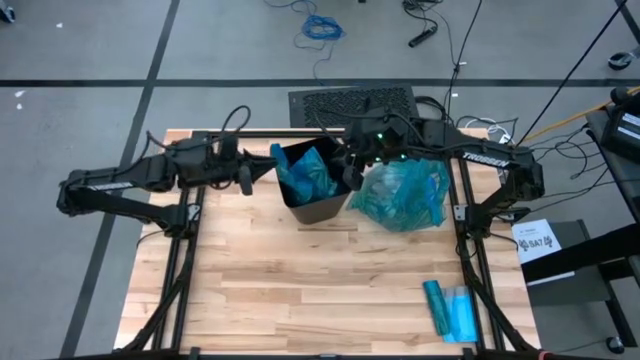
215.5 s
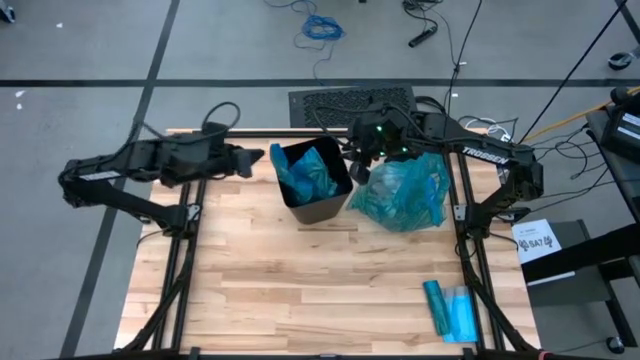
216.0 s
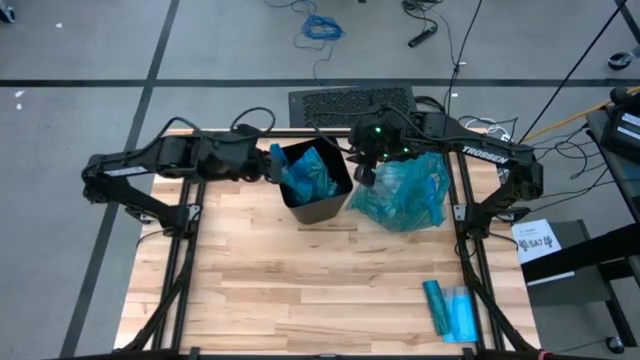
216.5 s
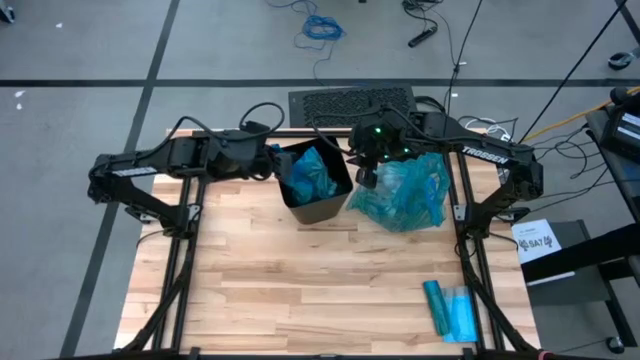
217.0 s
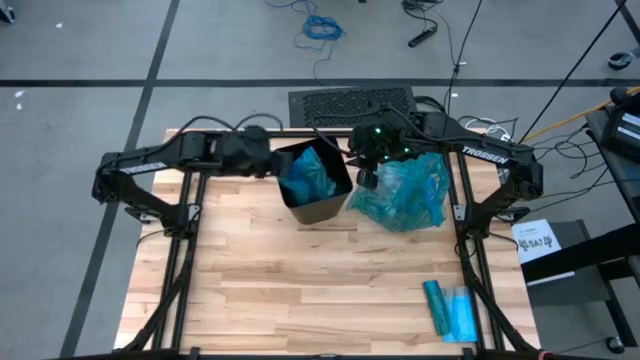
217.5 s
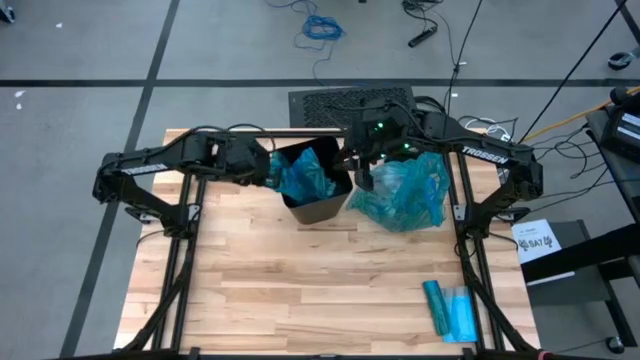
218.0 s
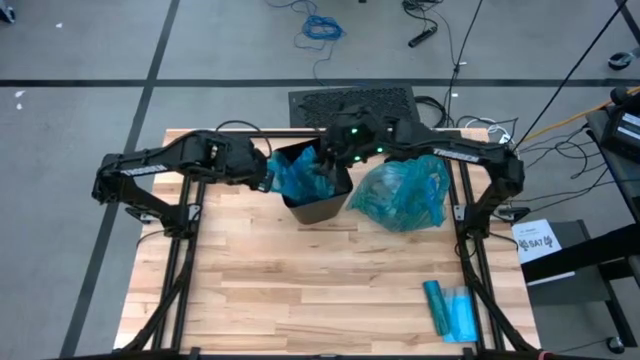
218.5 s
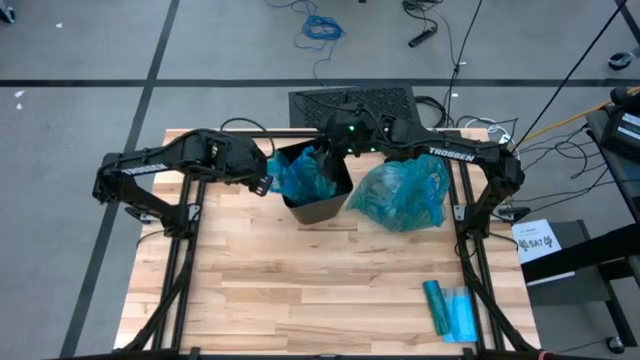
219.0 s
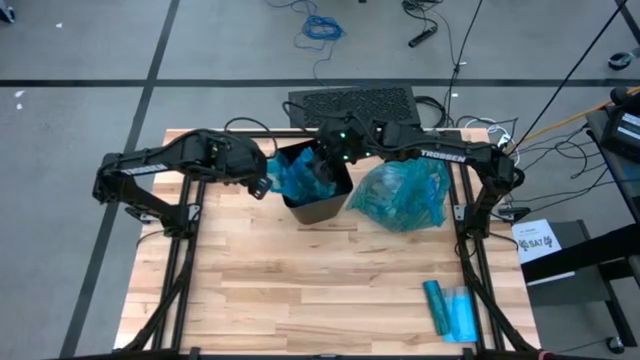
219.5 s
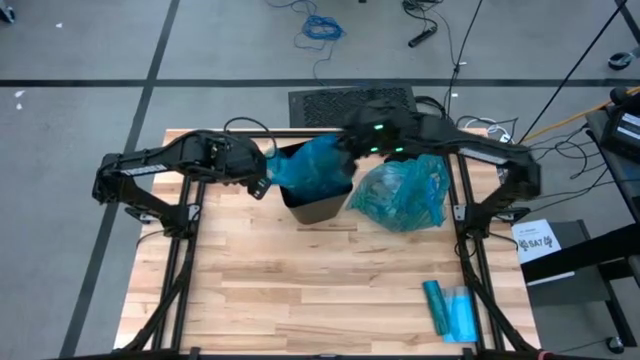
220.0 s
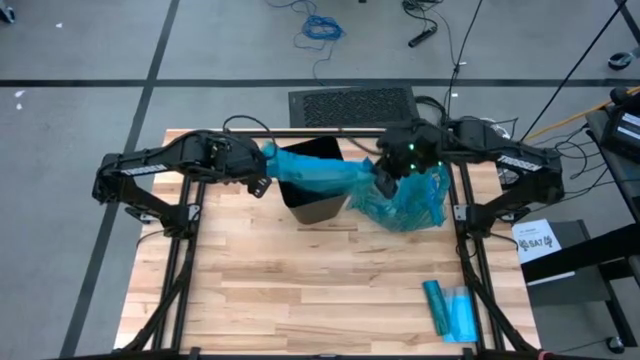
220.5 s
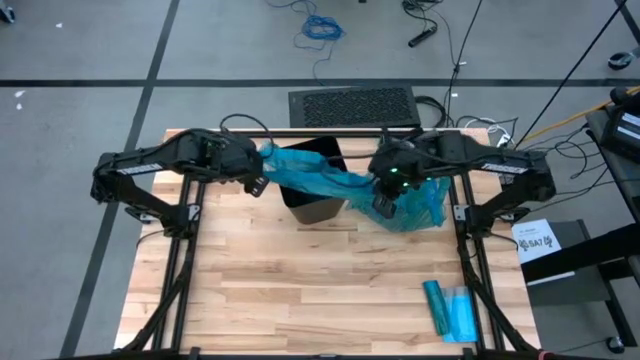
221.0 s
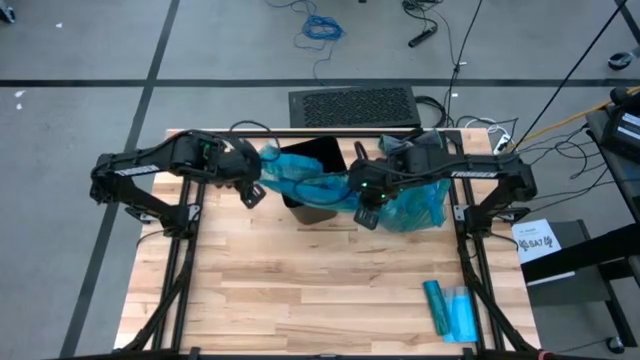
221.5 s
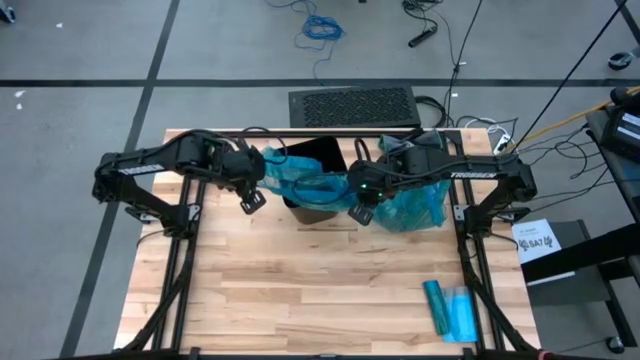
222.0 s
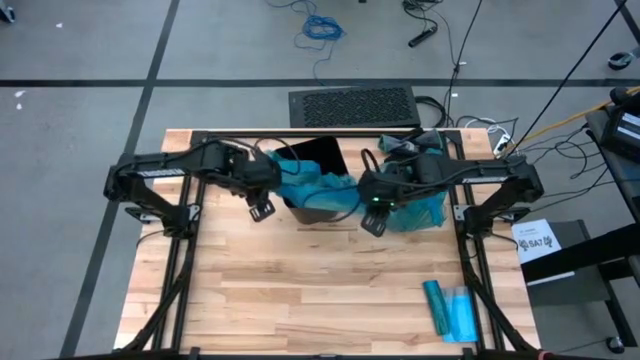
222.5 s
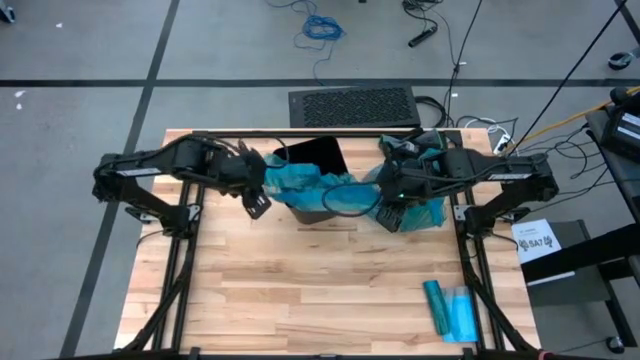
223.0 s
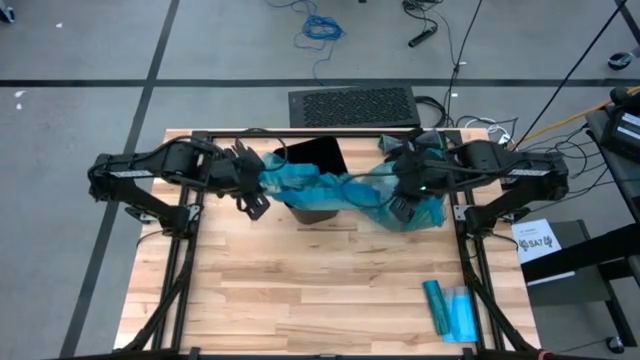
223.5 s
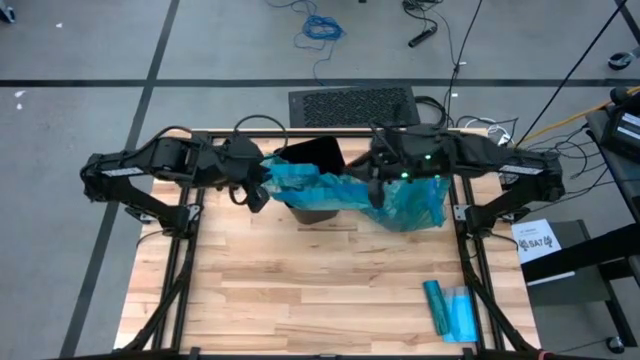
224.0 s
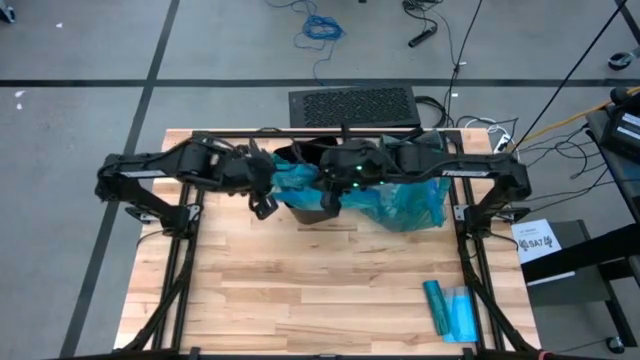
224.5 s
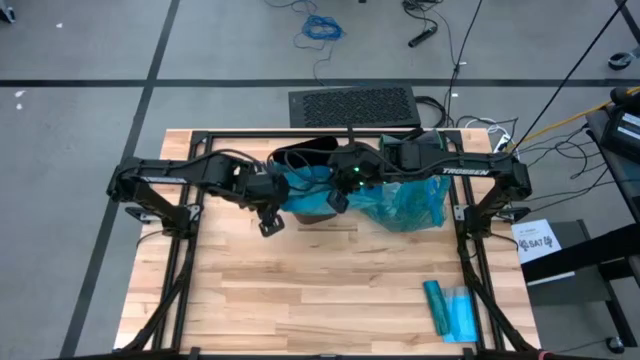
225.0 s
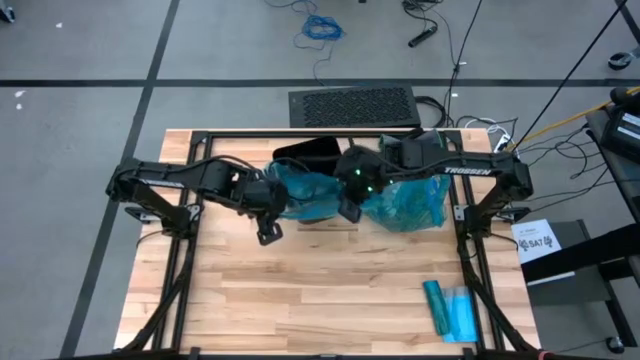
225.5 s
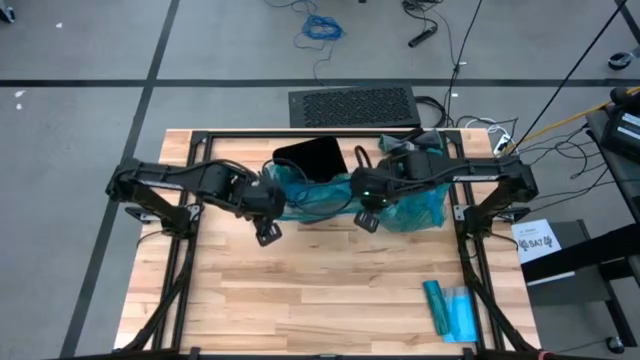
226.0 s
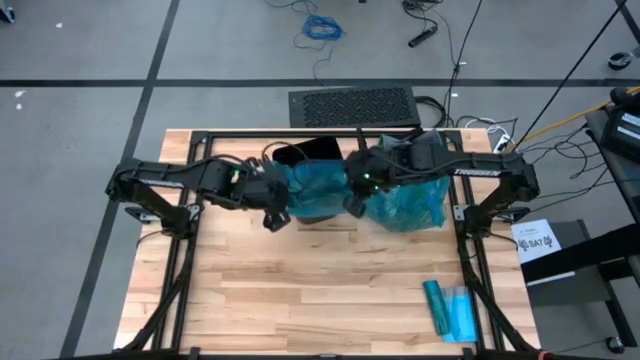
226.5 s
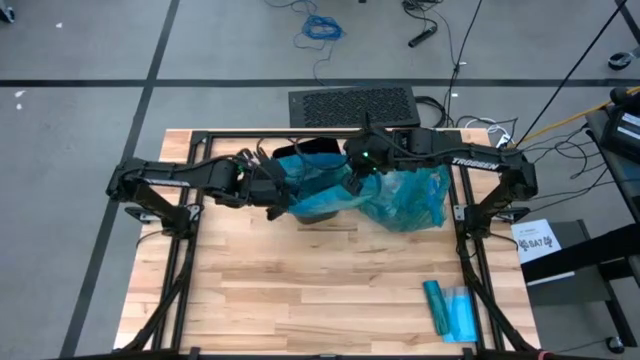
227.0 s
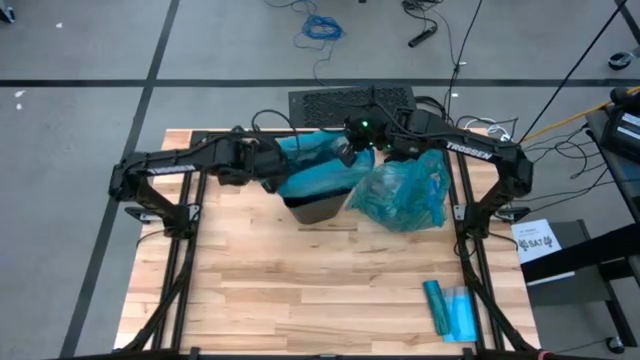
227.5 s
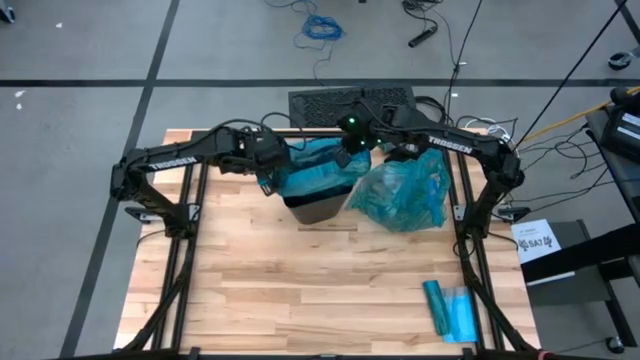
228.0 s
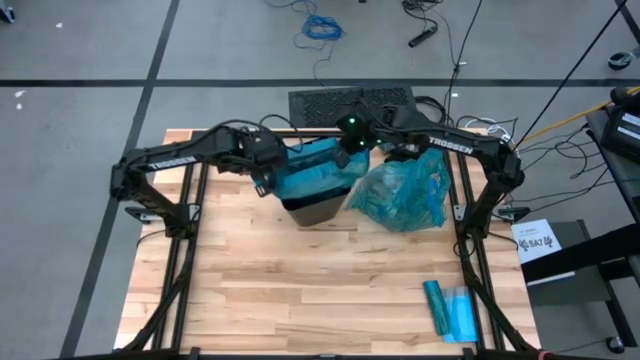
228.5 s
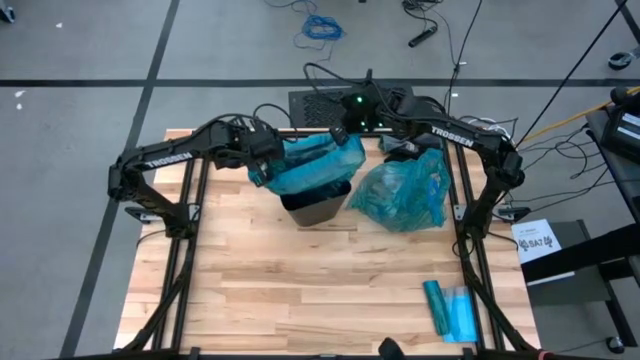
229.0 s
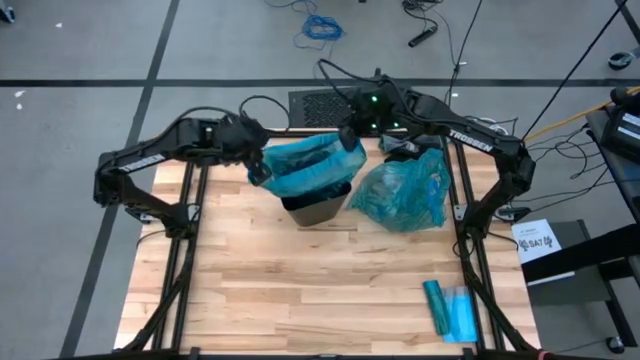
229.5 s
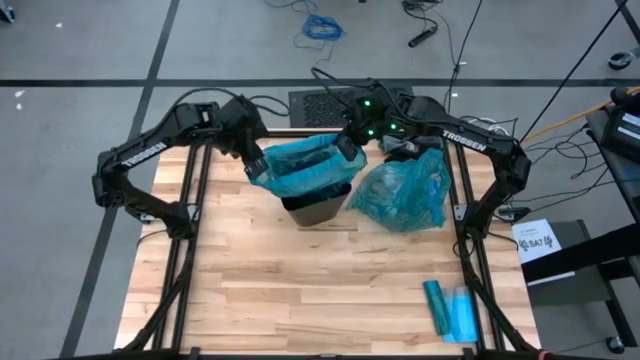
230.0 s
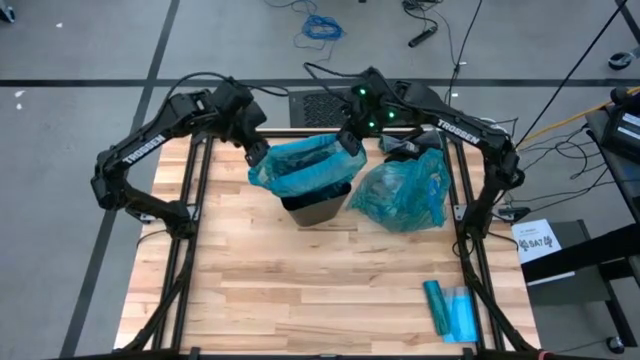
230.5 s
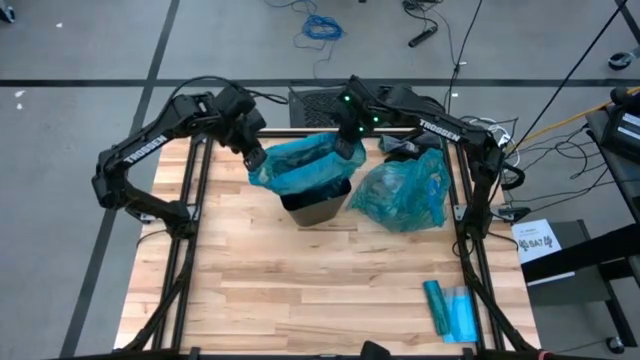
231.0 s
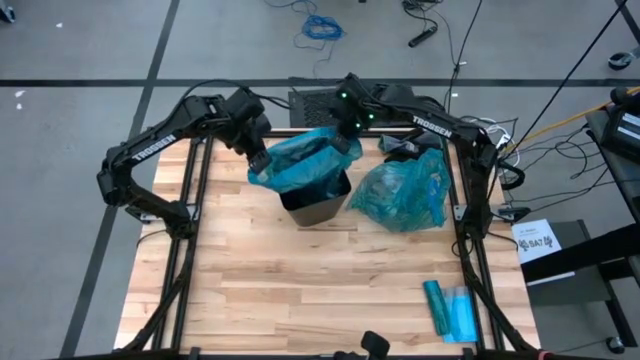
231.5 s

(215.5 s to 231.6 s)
Task: place trash/remove bag and relplace
Insert the new trash bag into the trash bin

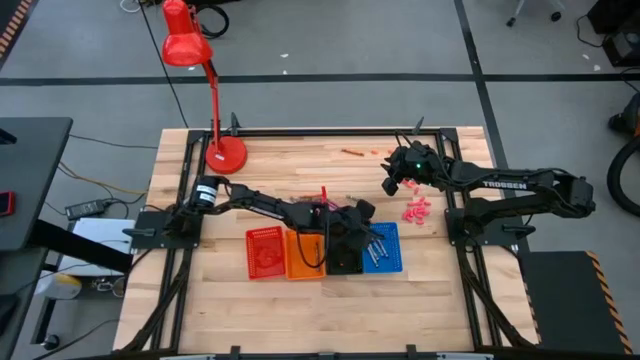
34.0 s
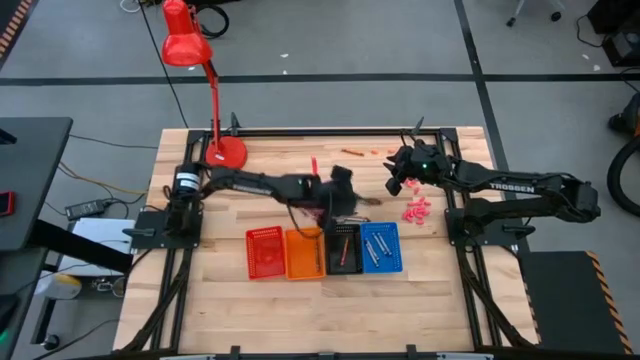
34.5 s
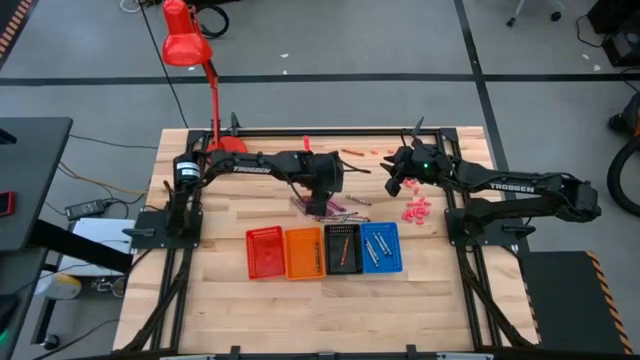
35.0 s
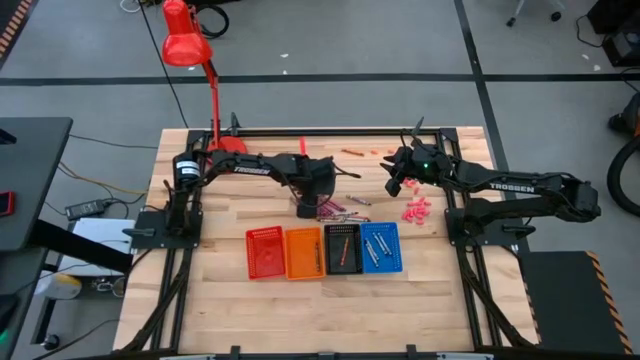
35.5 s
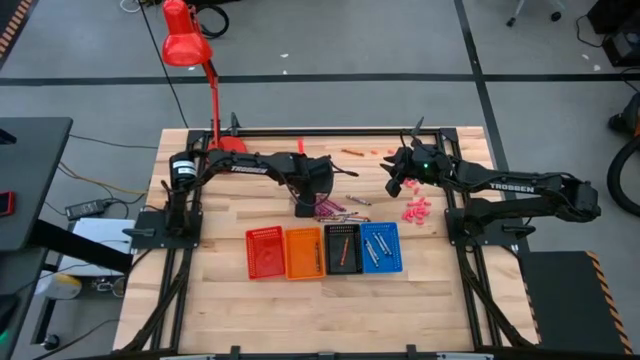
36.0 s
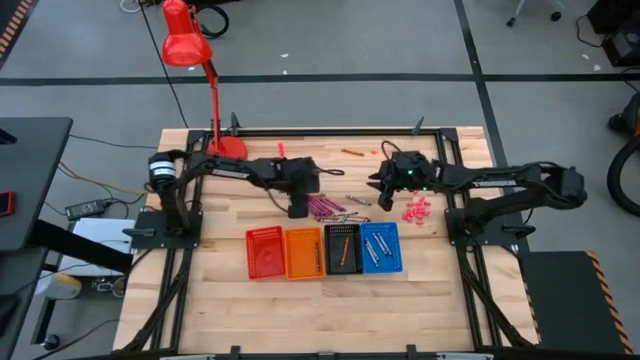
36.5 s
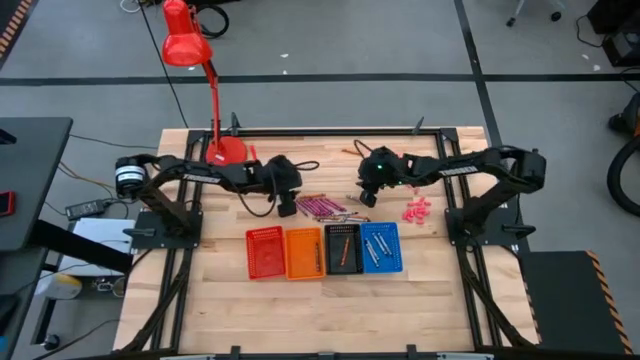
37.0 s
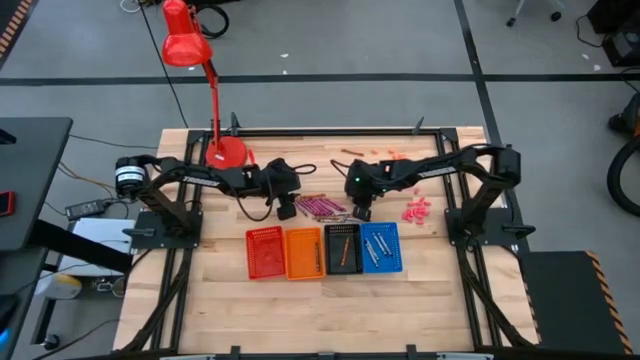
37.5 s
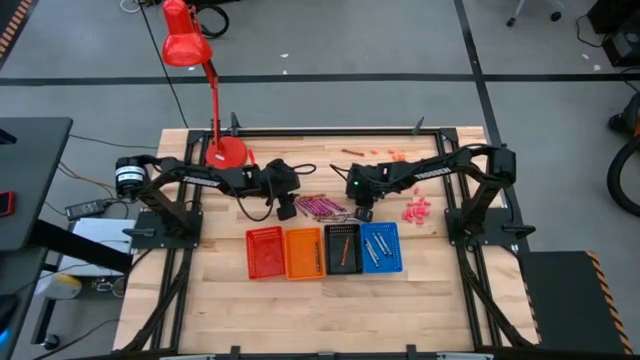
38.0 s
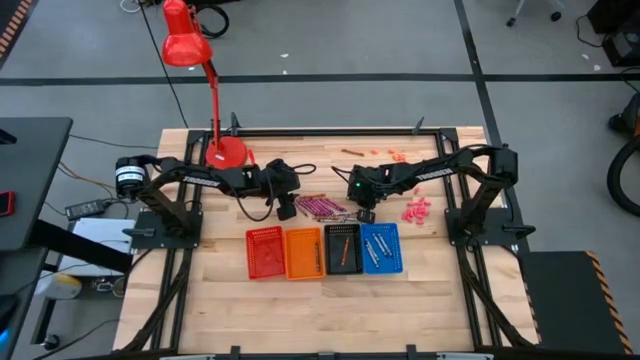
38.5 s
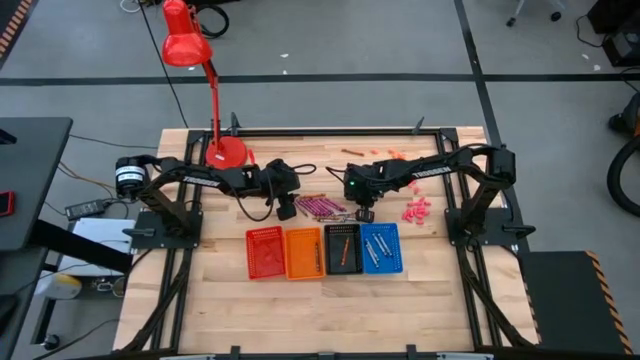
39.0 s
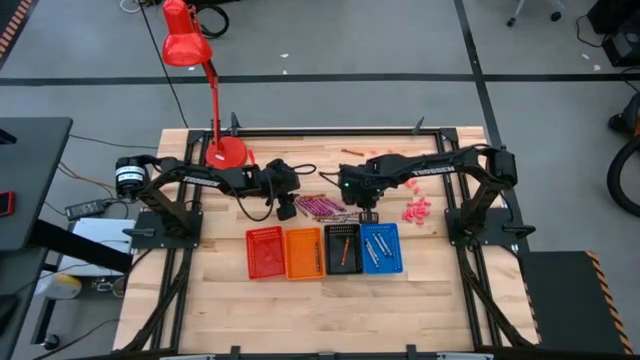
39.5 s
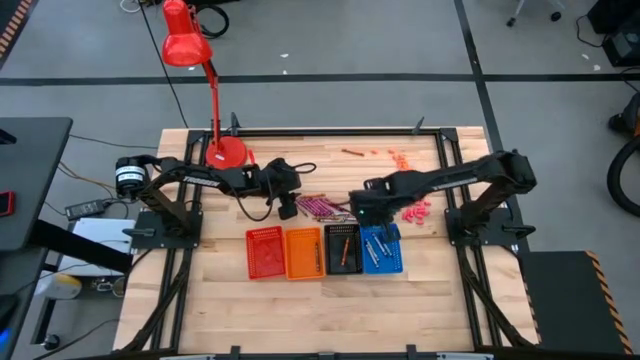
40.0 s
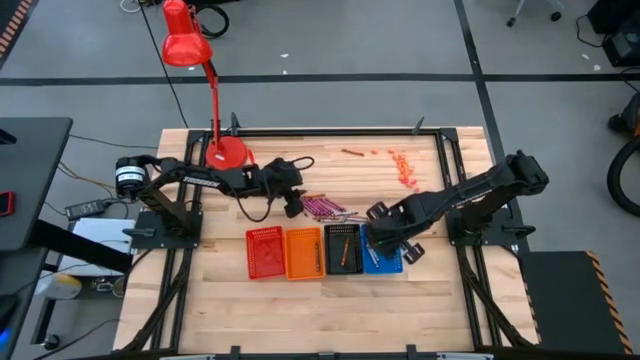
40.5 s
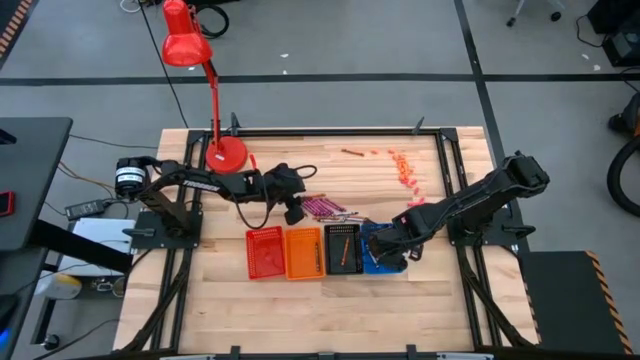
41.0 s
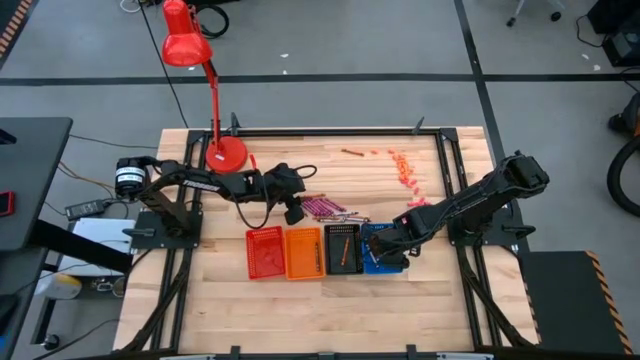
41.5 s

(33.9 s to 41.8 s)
Task: Sort crayons
Put the black crayon into the blue bin
